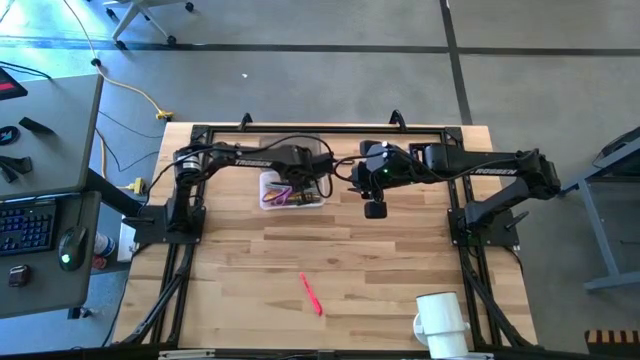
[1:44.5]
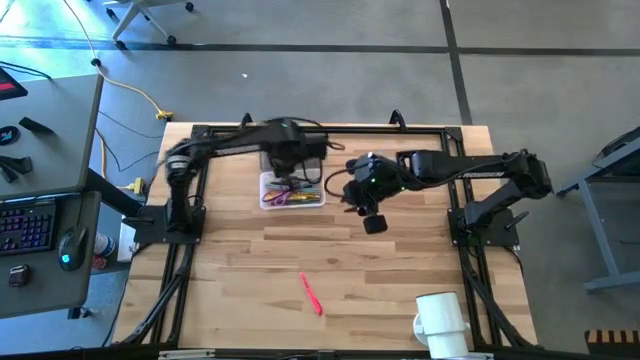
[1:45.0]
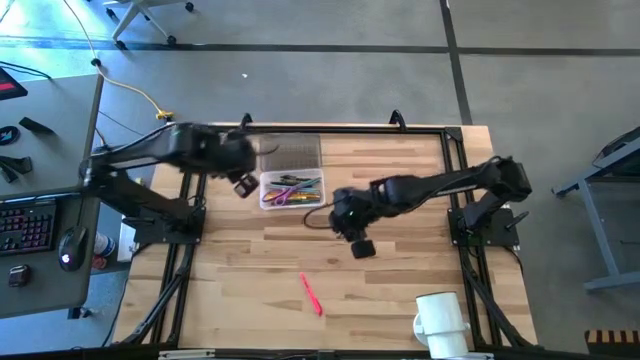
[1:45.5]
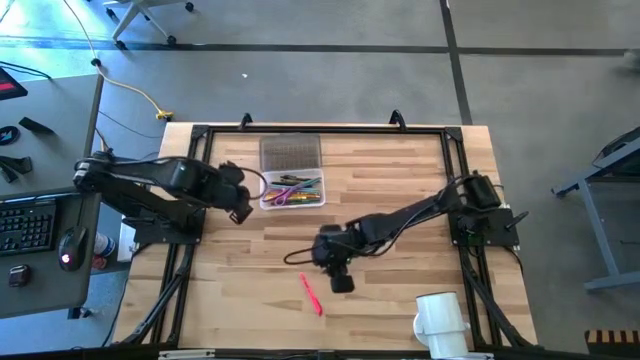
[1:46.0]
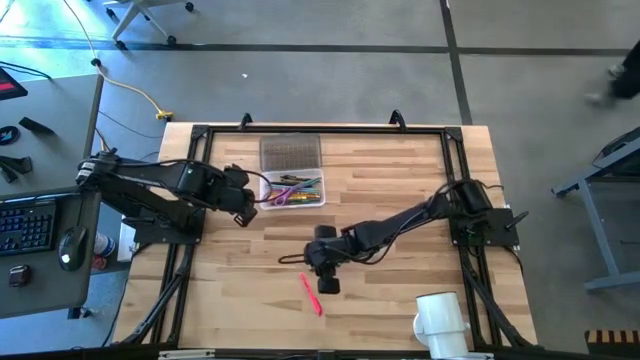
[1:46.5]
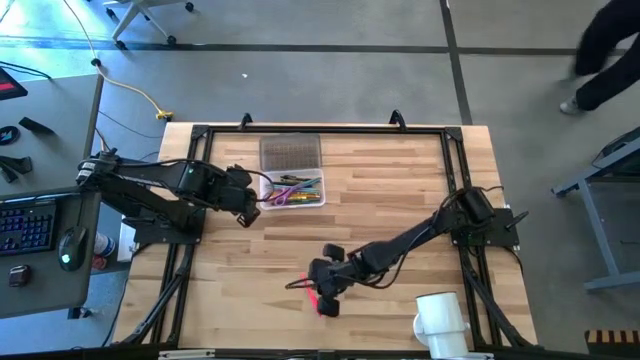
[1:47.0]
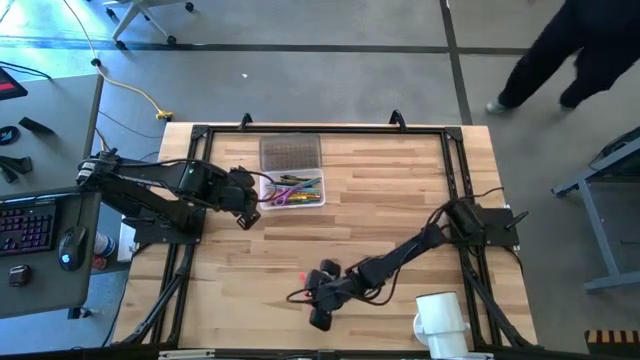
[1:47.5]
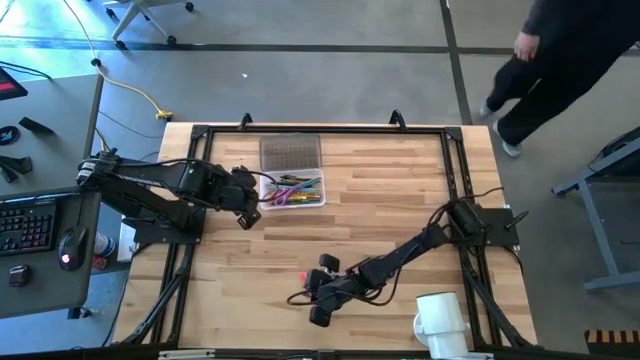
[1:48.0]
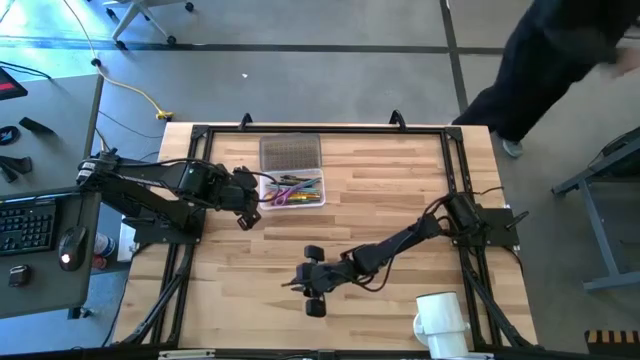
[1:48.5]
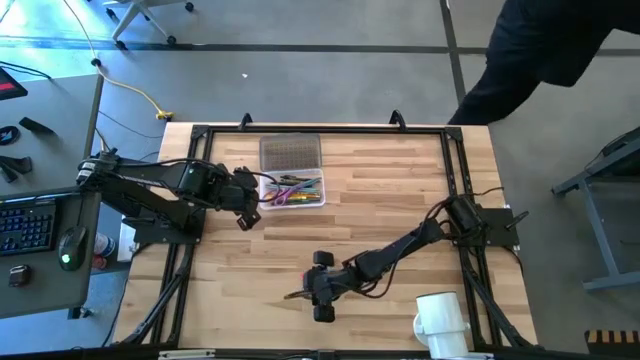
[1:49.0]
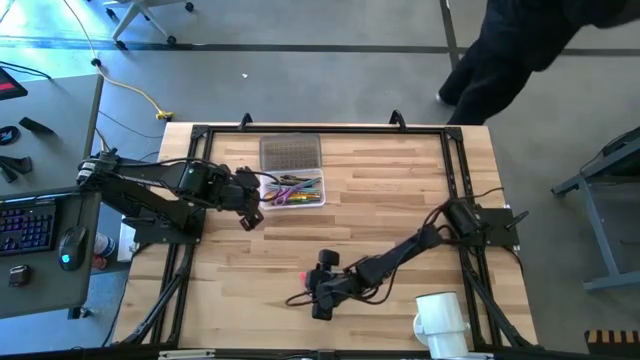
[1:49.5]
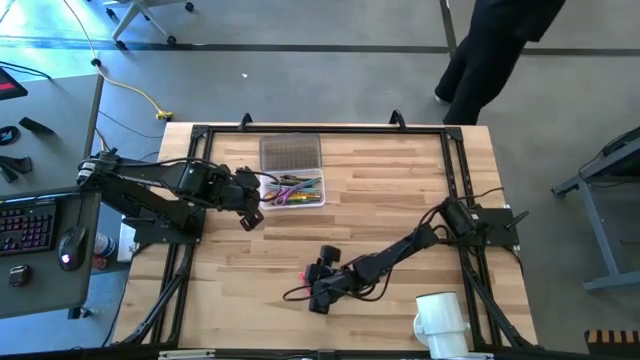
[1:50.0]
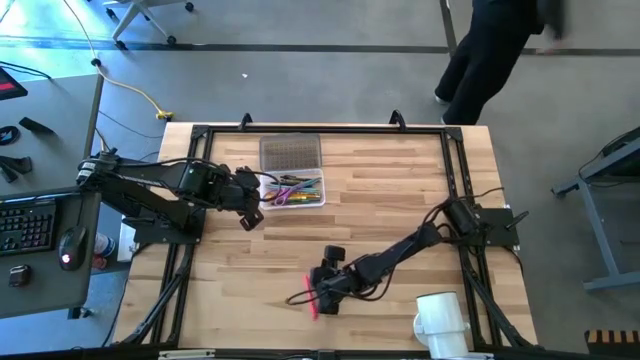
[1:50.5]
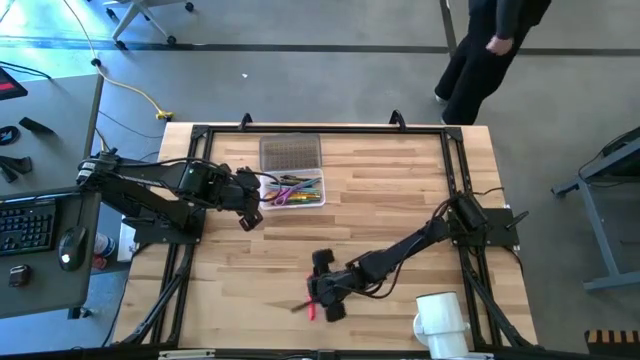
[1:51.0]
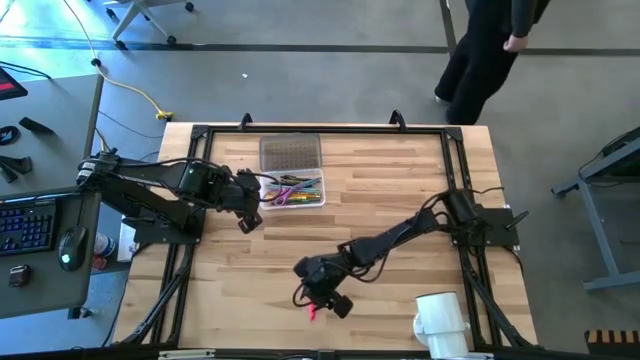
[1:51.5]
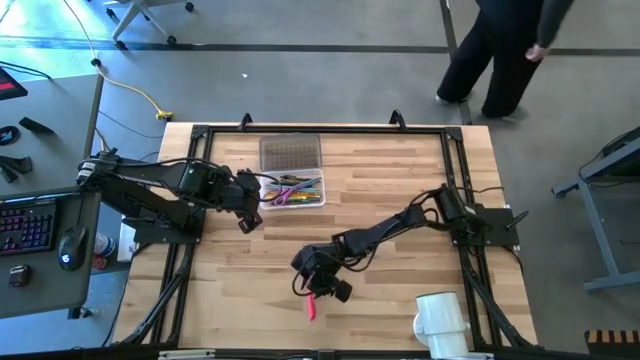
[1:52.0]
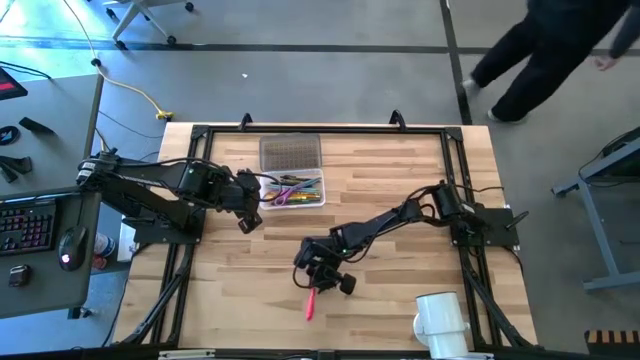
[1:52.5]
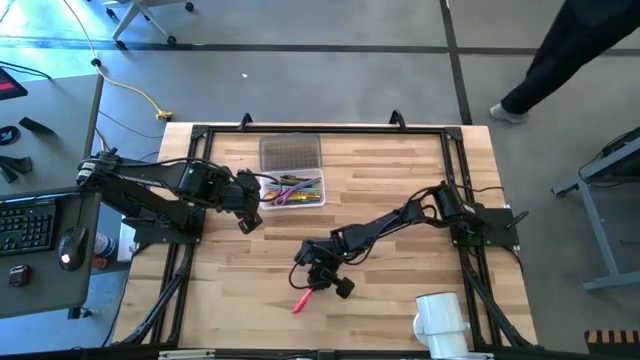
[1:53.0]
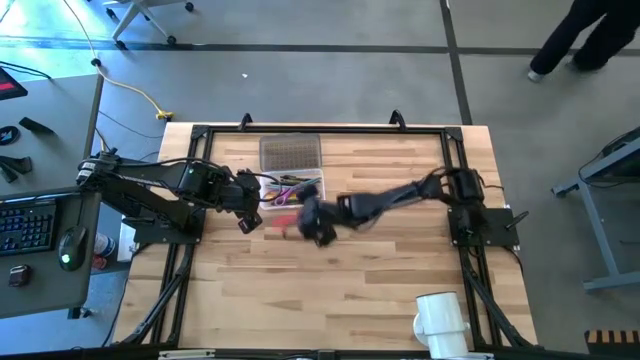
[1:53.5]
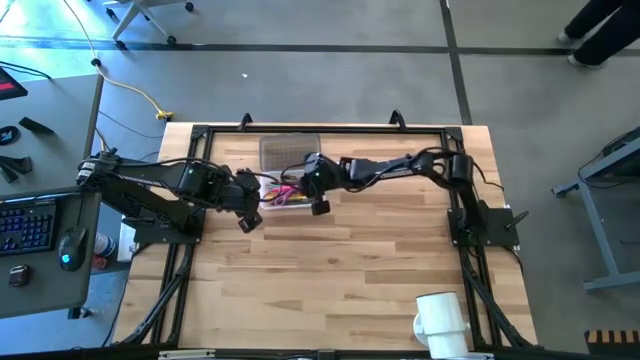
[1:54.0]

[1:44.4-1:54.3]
Task: Pick & place school supplies into a supply box
Put the pink pen into the transparent supply box

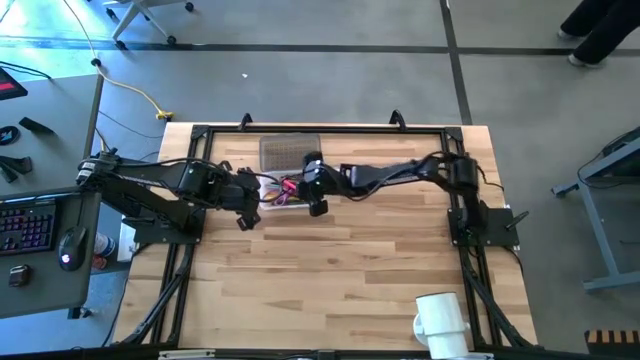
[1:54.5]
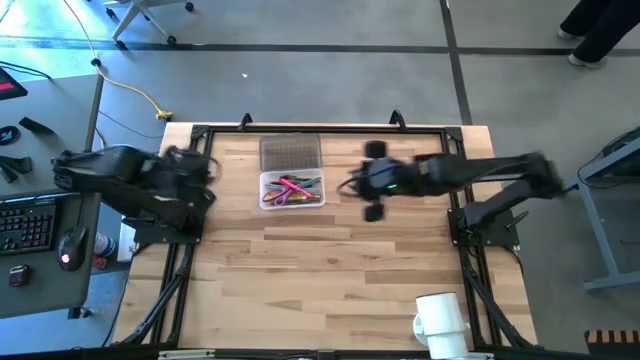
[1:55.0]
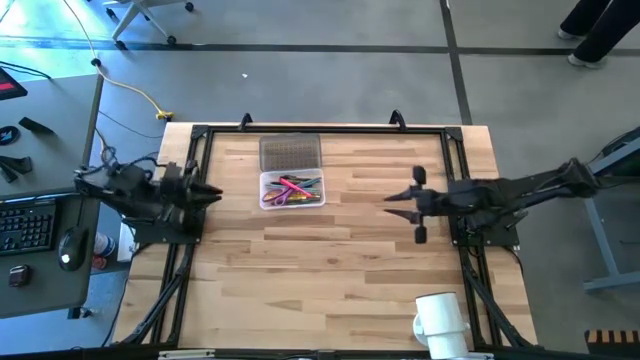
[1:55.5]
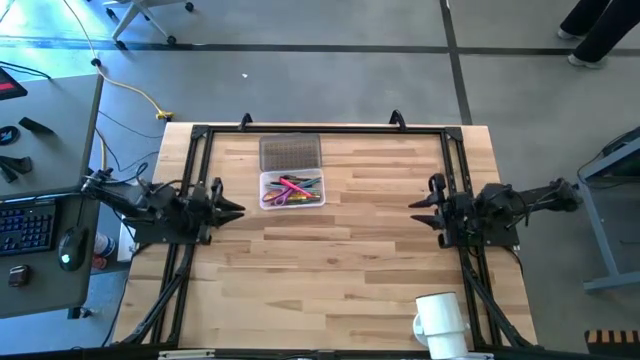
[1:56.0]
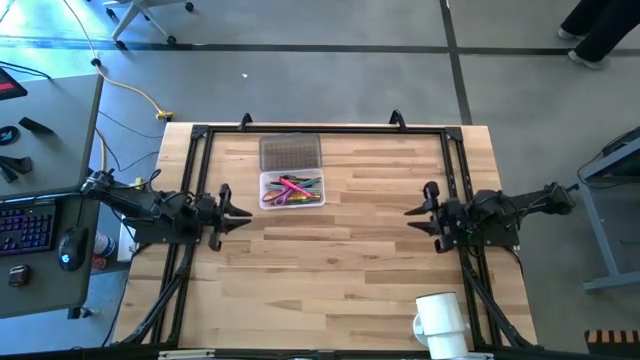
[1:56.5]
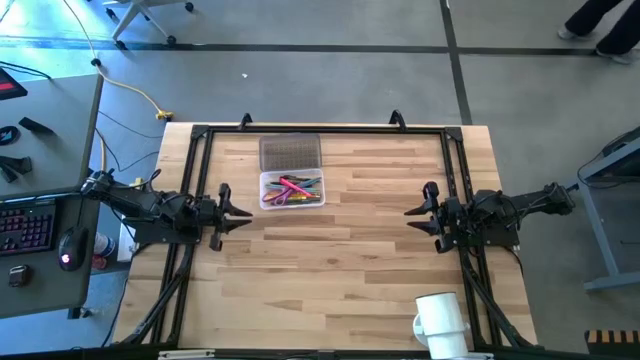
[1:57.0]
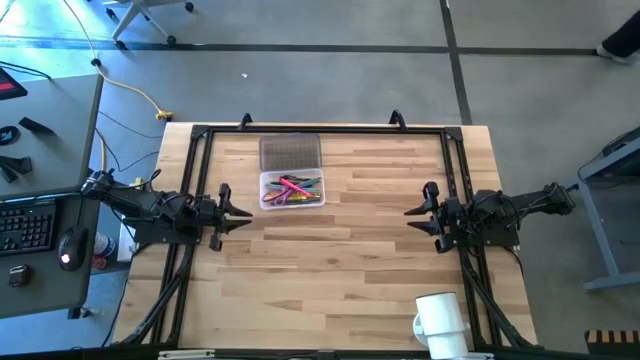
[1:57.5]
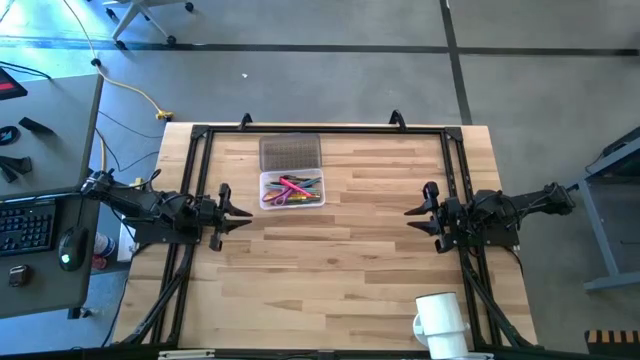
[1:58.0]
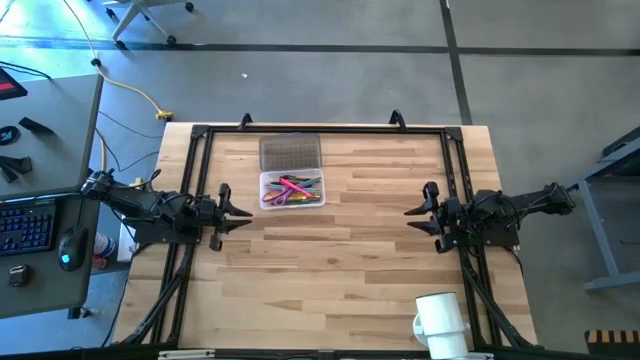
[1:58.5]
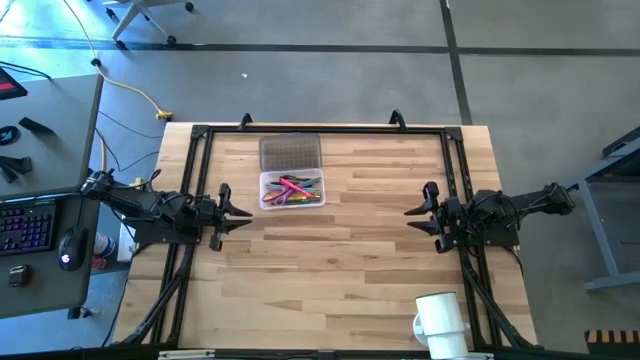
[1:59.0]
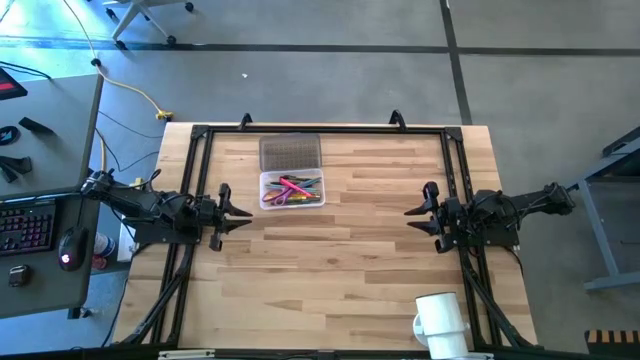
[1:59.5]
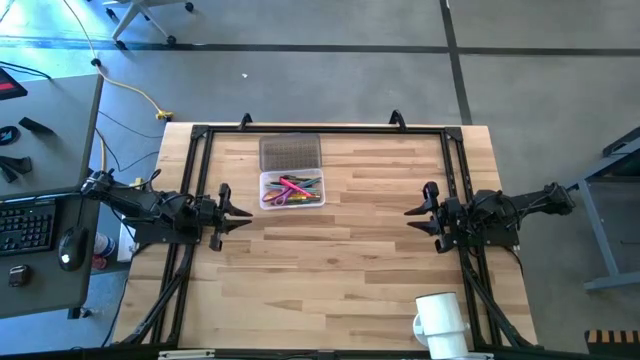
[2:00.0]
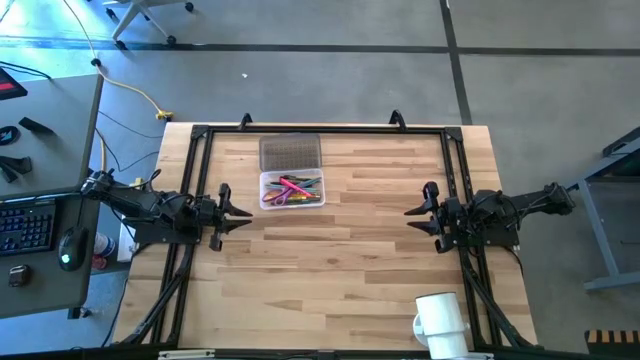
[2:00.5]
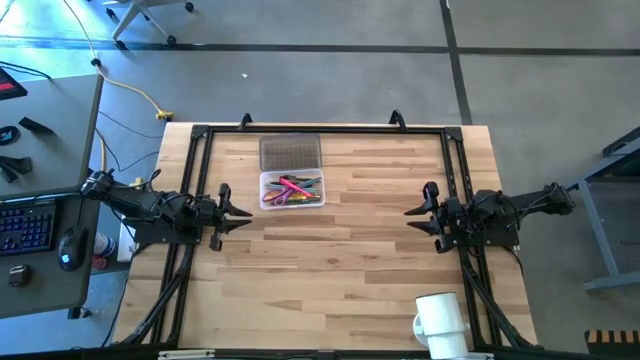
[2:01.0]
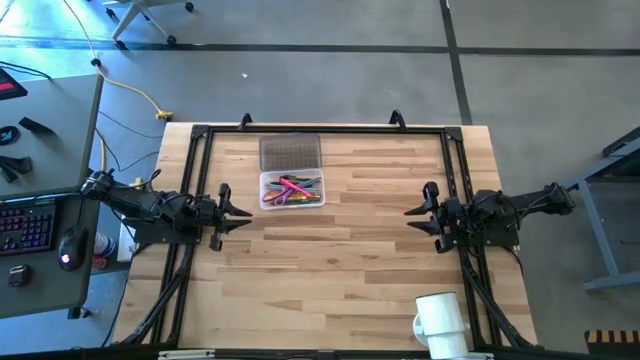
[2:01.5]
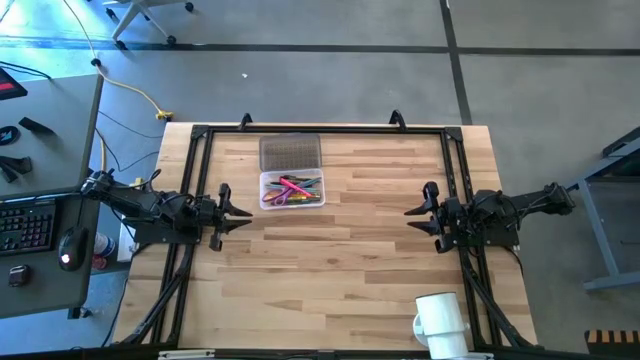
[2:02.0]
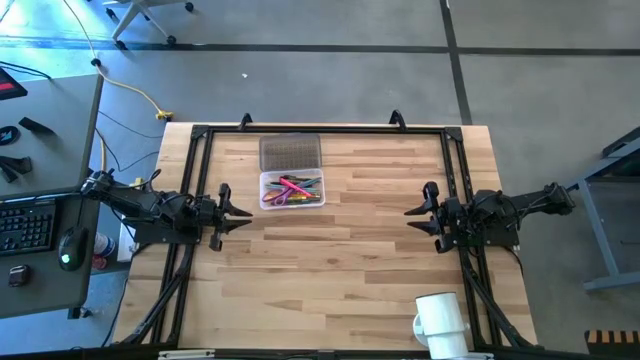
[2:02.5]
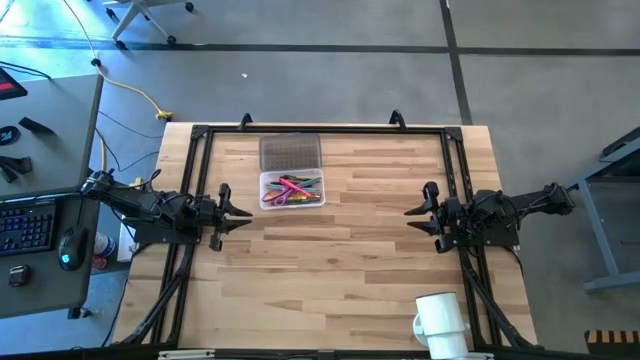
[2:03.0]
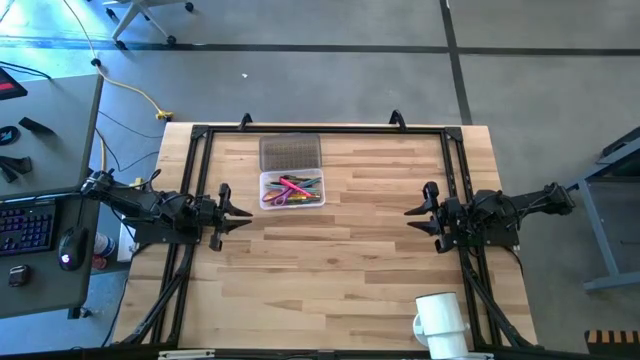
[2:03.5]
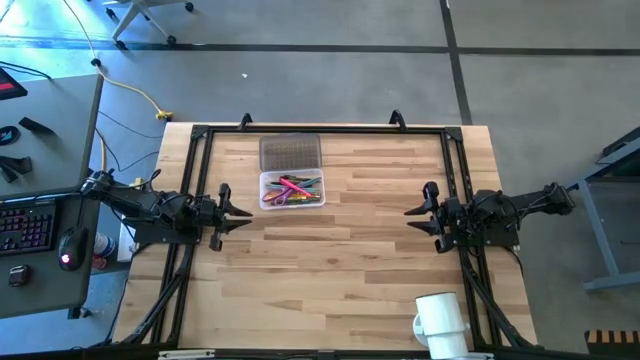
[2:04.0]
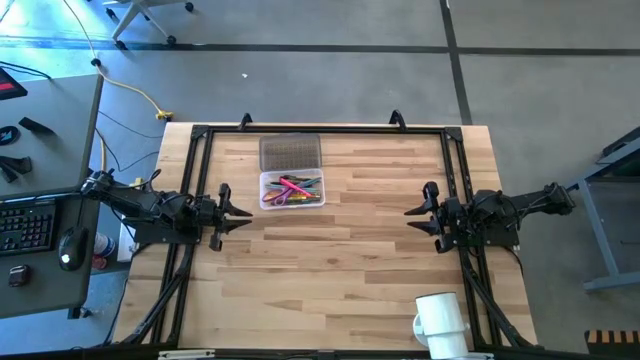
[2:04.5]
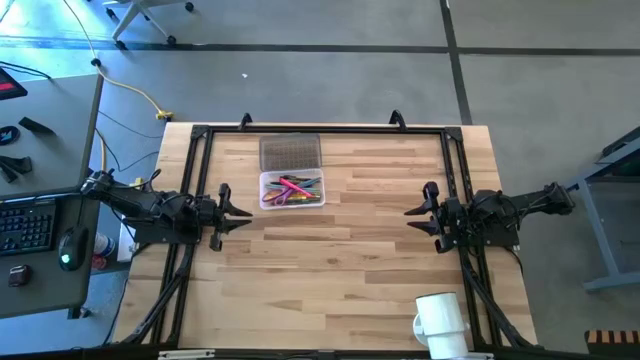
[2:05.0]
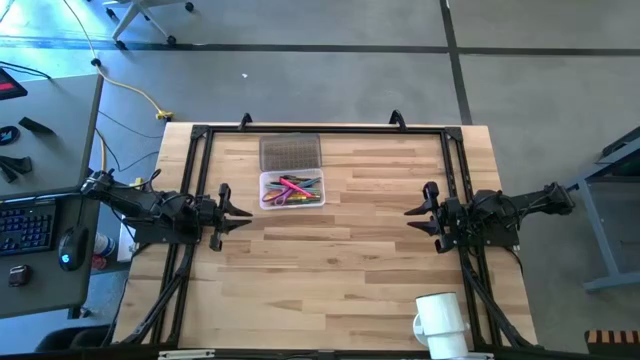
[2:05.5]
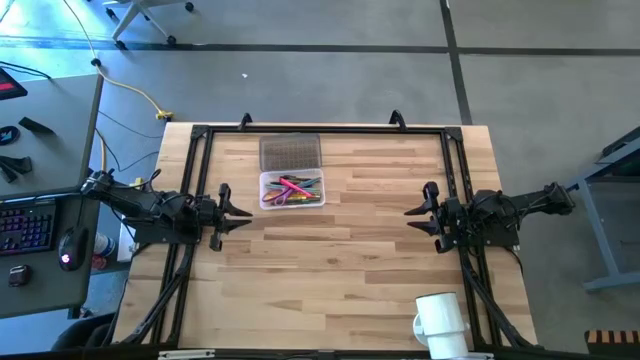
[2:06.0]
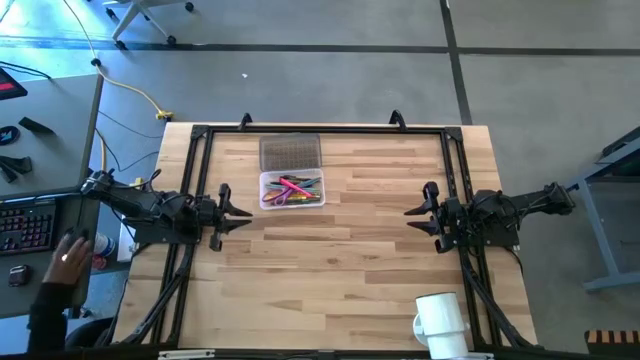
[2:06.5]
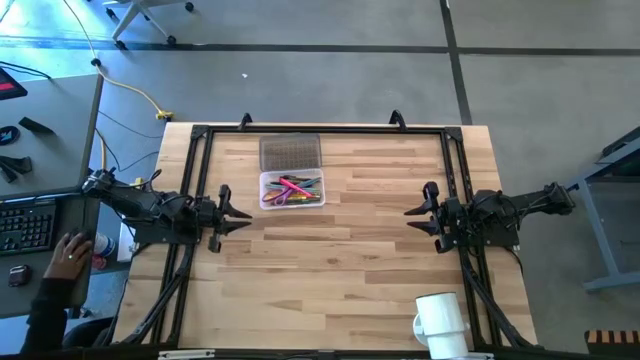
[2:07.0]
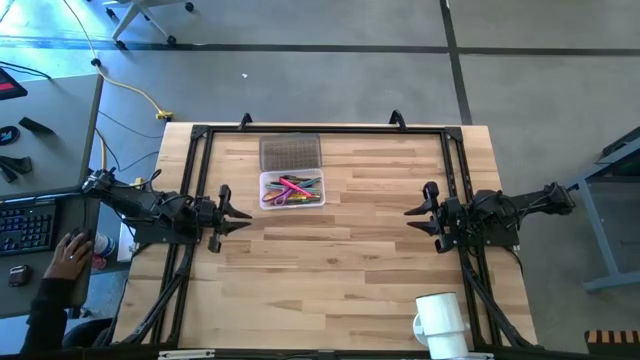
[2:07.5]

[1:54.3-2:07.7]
Return to Home Position
